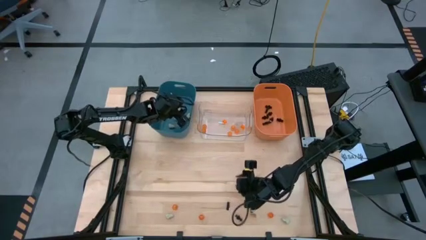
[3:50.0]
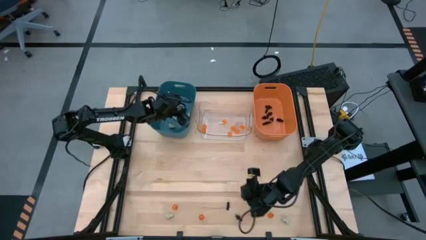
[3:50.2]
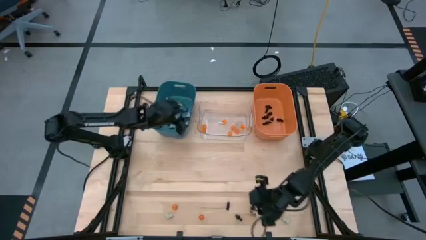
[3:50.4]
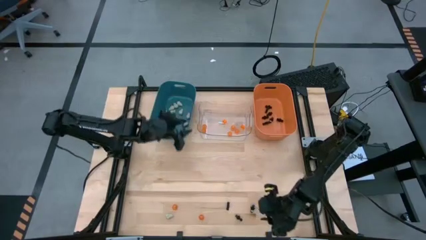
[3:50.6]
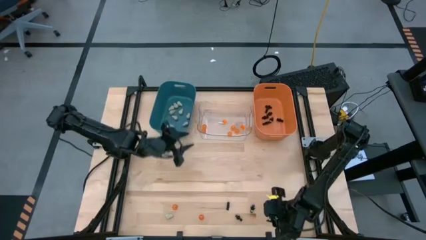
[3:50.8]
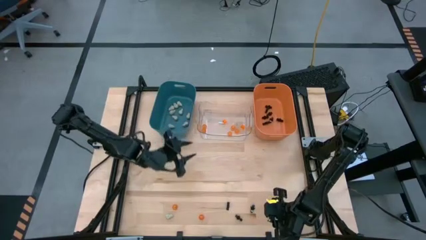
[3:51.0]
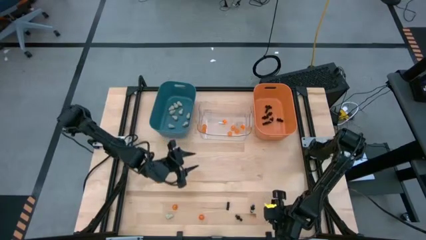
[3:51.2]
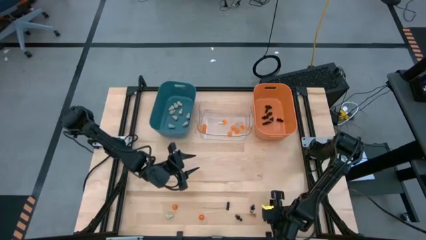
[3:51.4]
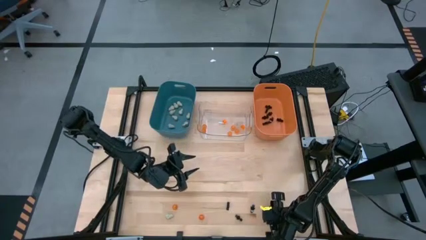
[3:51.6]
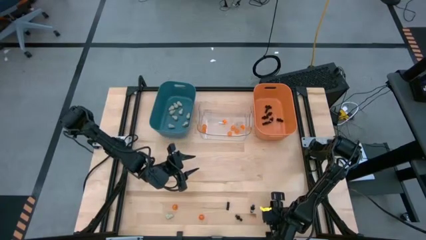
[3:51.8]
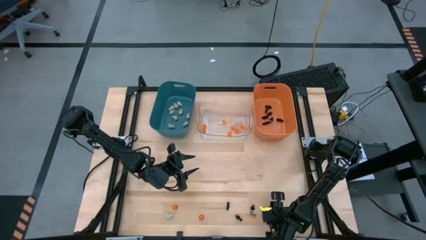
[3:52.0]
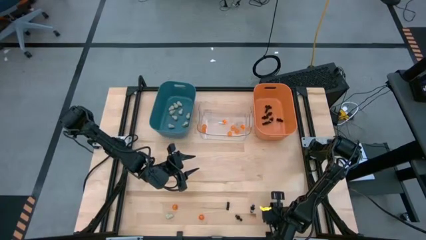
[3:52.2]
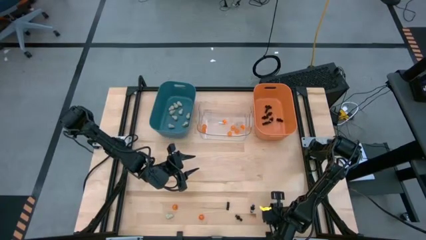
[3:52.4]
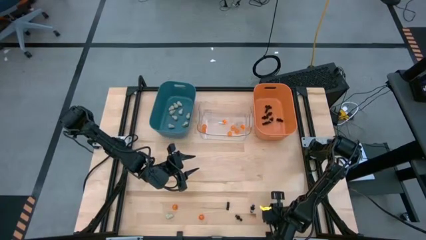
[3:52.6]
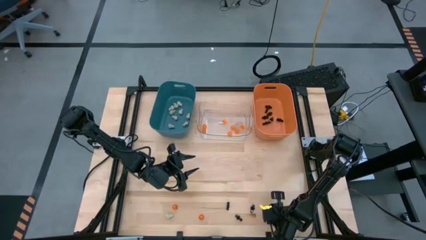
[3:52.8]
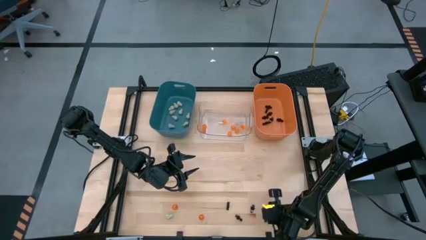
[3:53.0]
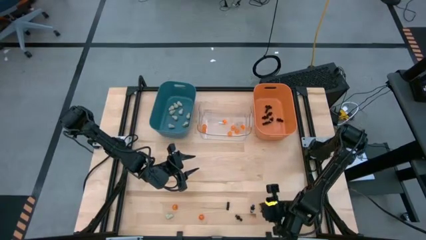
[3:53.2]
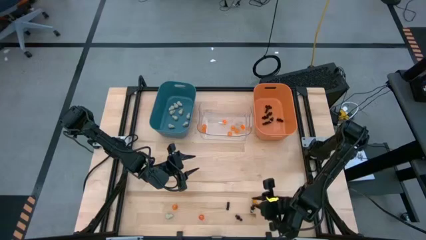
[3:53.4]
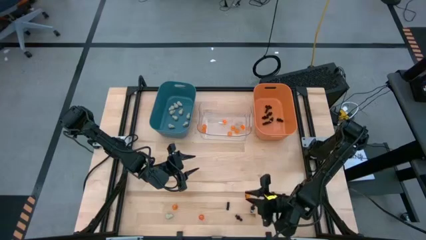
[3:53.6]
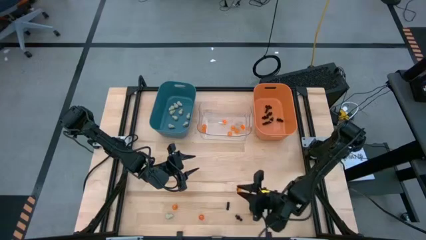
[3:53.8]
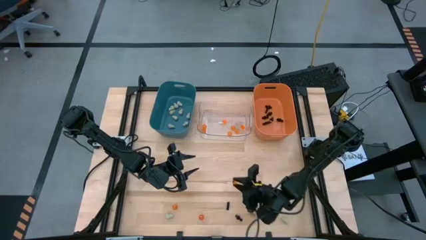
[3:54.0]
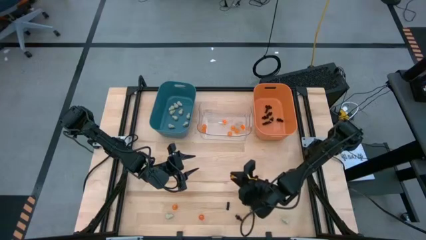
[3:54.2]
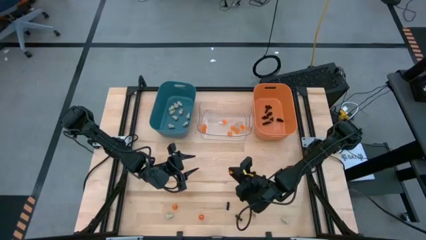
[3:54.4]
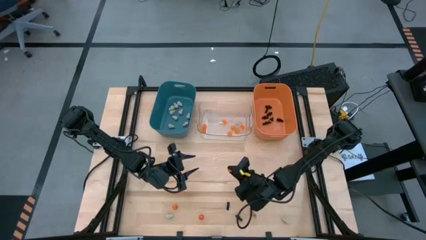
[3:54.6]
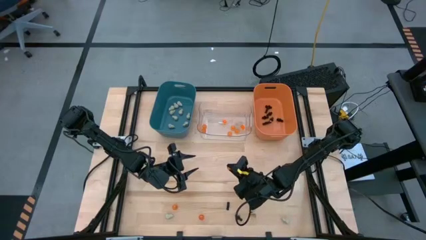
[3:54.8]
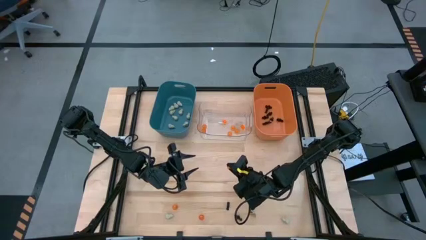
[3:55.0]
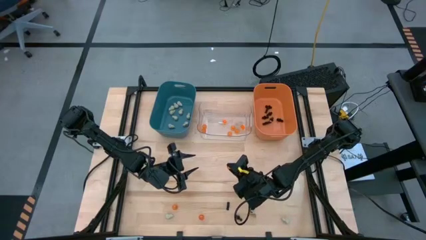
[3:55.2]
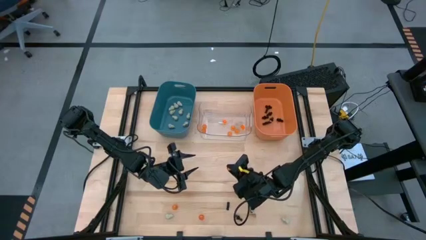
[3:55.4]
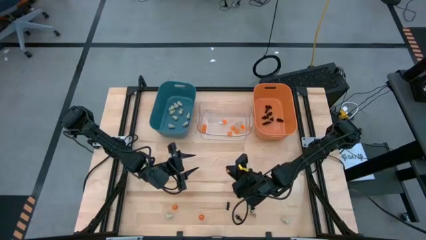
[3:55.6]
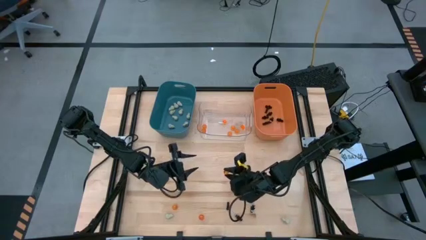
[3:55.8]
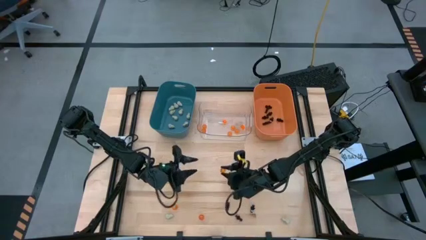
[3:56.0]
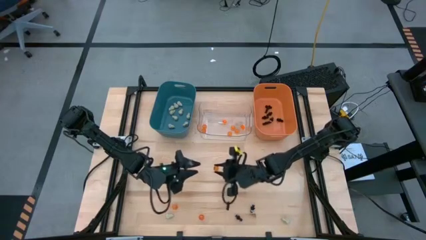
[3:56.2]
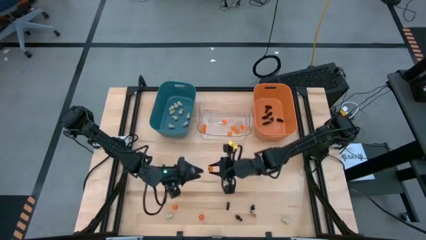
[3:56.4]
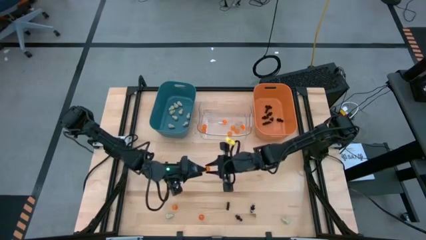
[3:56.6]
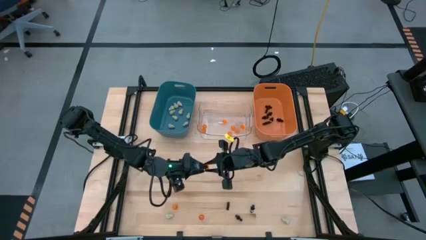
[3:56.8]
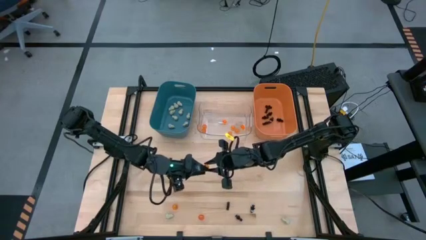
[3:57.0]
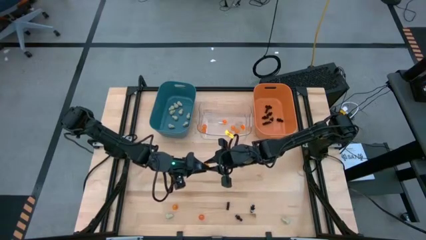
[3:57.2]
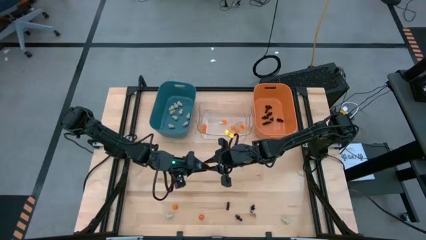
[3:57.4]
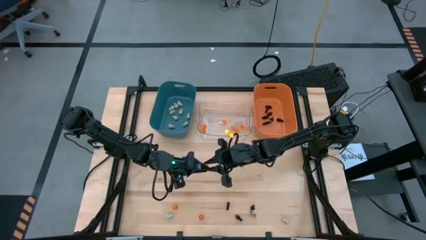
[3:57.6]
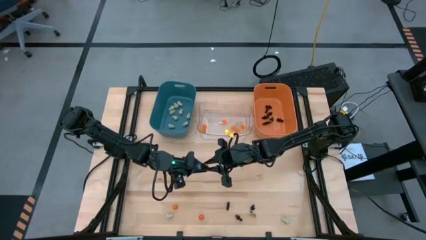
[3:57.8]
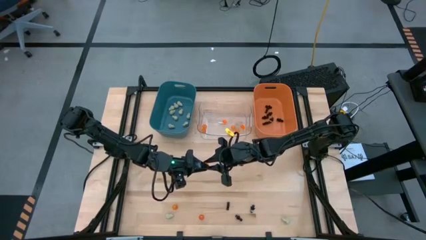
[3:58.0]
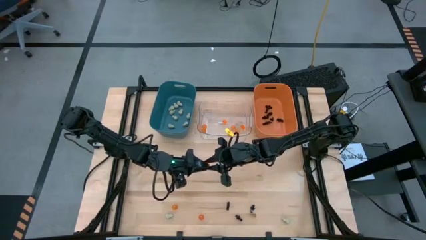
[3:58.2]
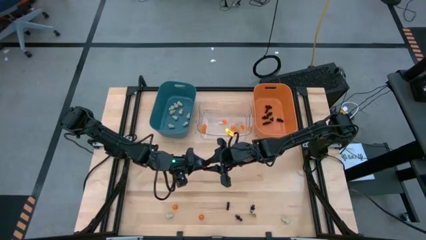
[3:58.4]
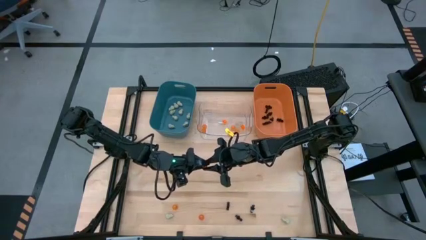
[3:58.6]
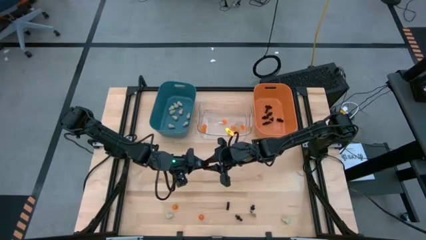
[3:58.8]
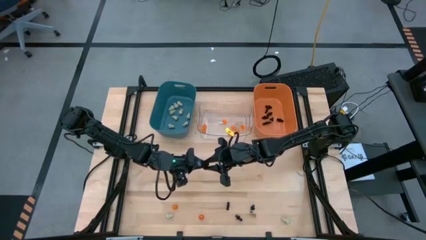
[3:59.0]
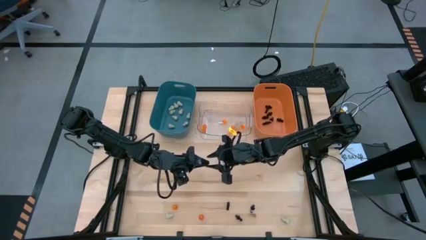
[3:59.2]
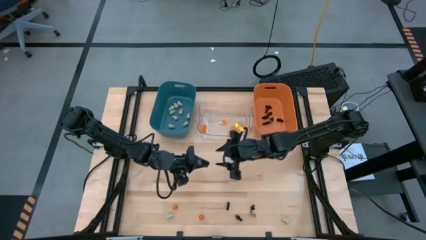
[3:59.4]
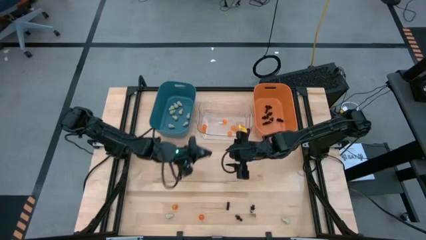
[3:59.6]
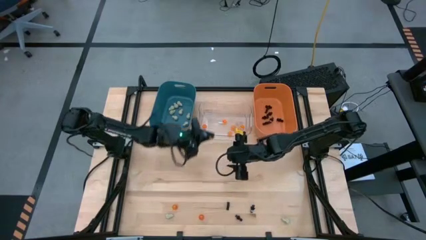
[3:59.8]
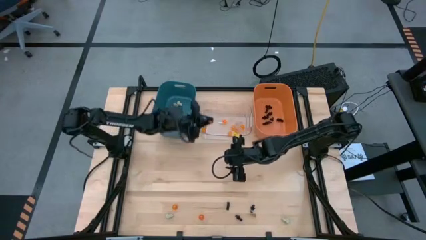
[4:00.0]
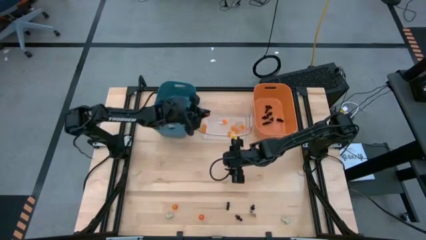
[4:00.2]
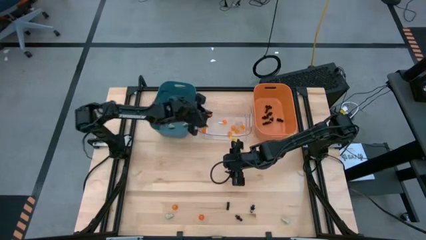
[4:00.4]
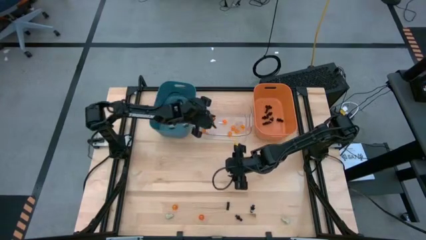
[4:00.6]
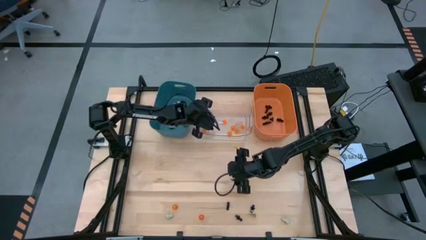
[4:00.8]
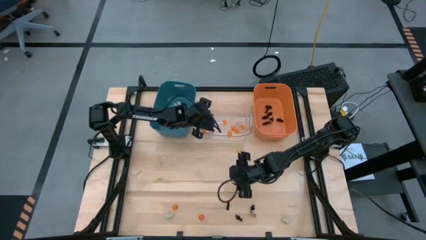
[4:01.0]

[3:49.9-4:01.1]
Task: Sort Halloween decoration
Put the orange pumpkin toy into the transparent bin

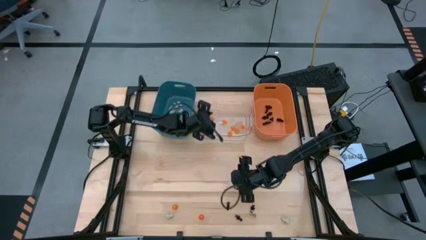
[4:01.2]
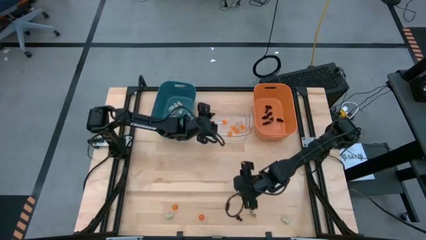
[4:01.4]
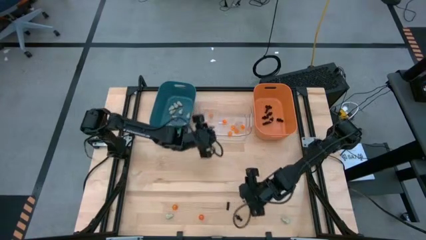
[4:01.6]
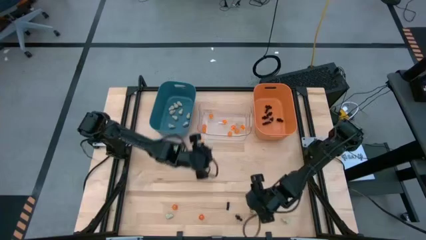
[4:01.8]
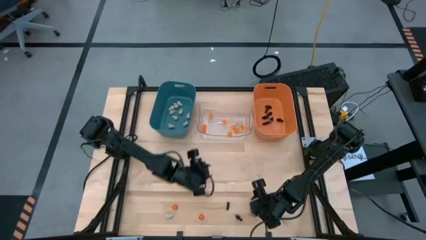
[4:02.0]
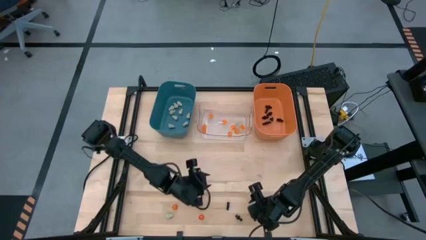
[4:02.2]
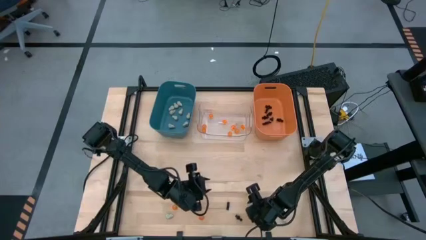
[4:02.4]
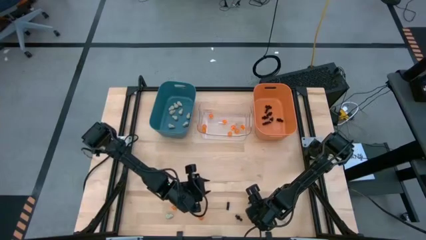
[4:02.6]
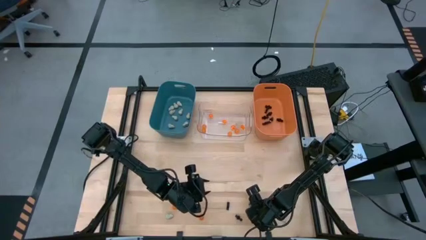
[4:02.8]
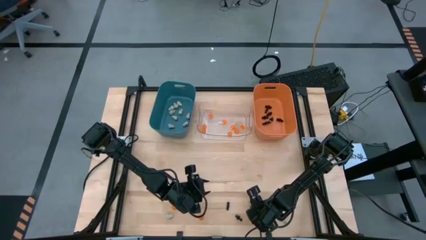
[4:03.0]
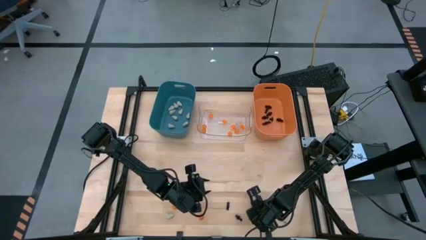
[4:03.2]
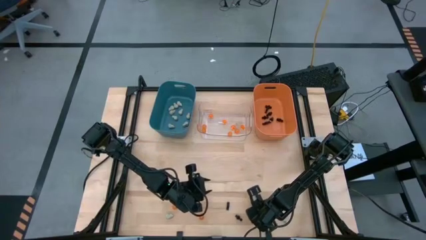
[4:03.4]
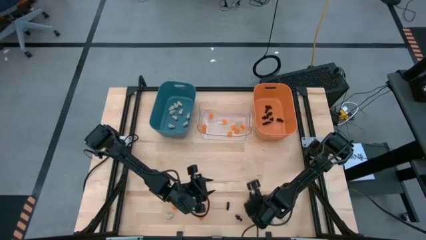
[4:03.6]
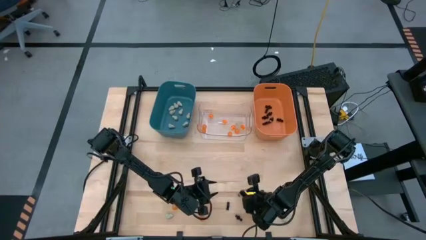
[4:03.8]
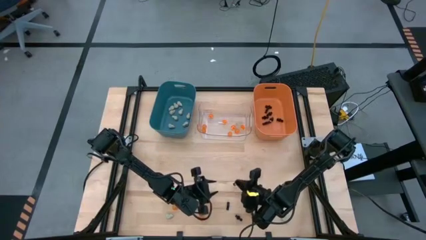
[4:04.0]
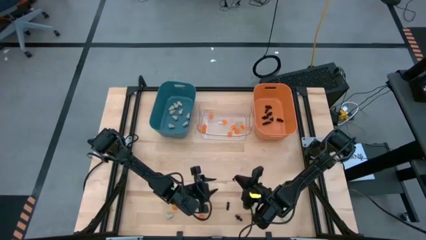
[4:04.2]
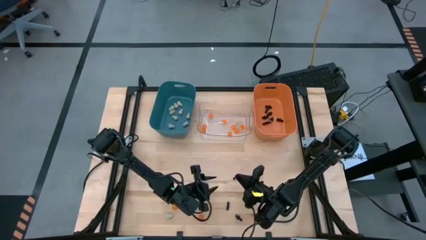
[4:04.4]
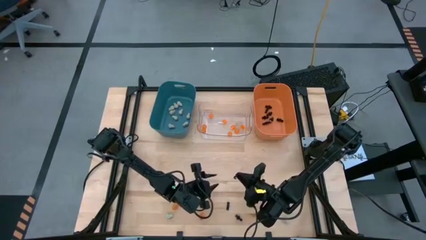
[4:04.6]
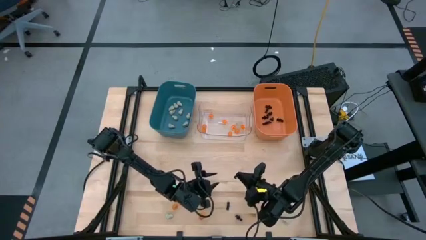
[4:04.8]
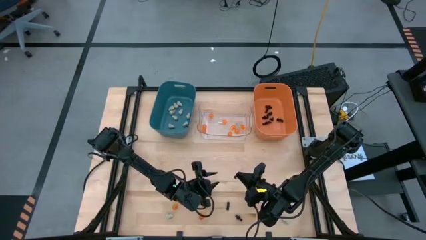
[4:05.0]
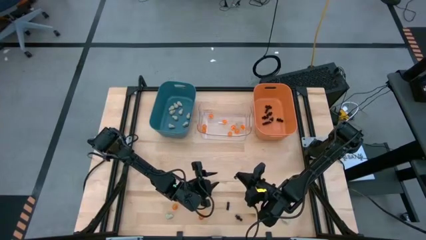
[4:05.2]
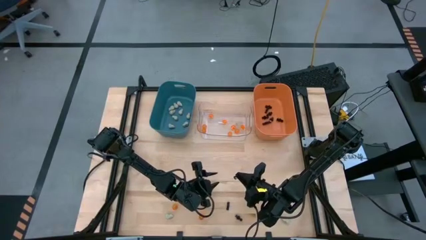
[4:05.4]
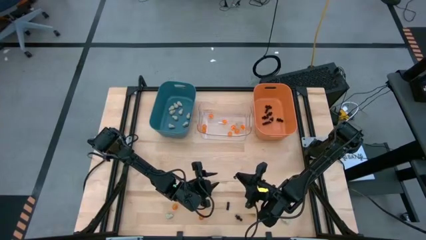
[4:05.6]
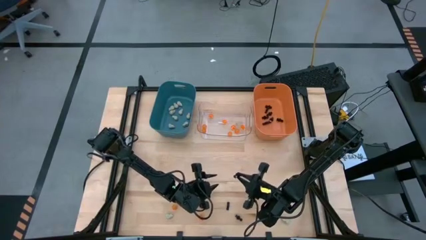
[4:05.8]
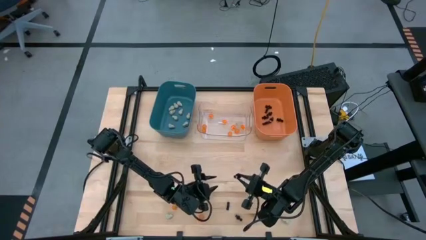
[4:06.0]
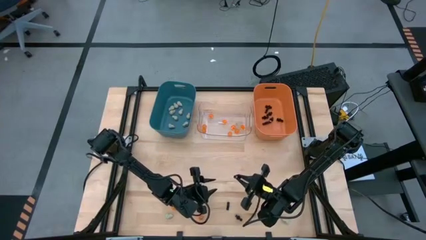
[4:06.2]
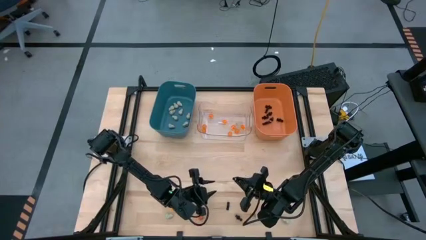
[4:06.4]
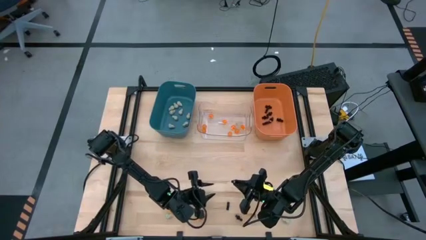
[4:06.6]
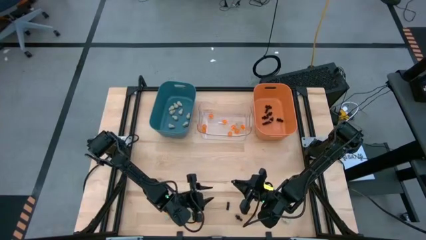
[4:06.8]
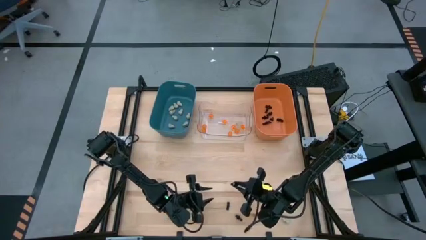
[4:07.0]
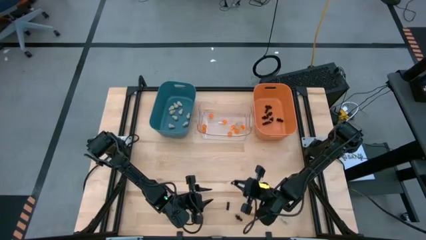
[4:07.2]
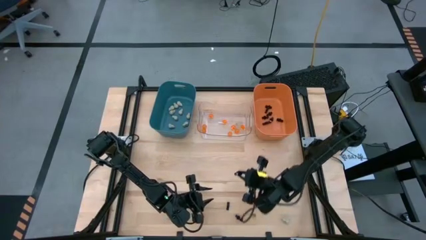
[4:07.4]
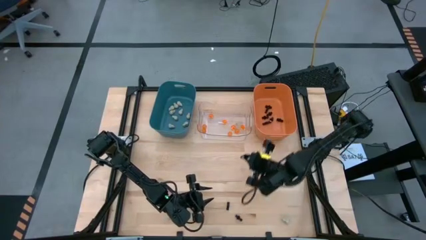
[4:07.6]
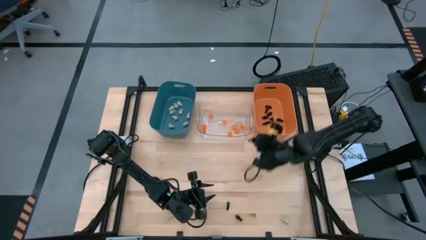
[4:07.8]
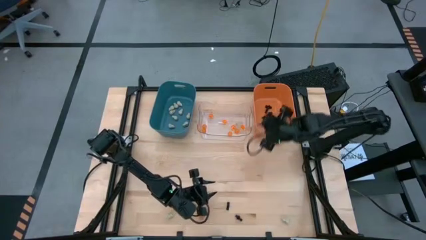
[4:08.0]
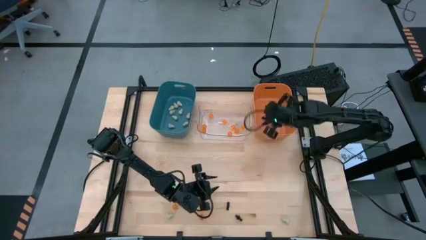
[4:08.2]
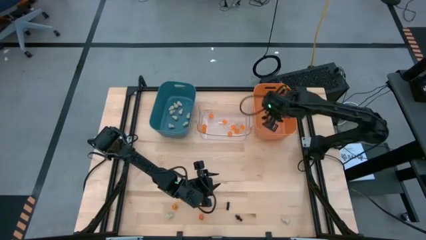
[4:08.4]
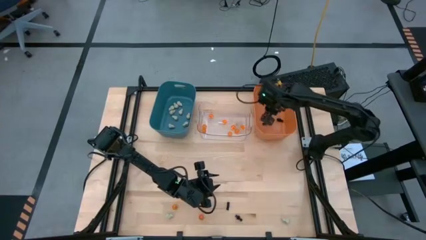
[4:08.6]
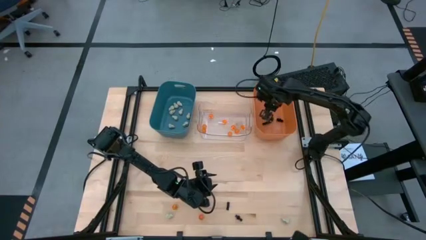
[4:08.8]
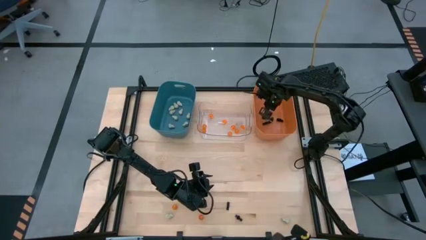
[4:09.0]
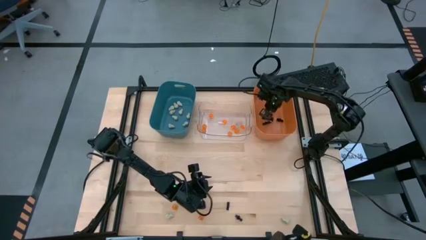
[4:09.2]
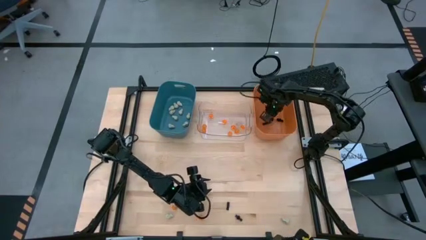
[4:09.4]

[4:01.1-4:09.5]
Put the black skeleton toy into the orange bin
